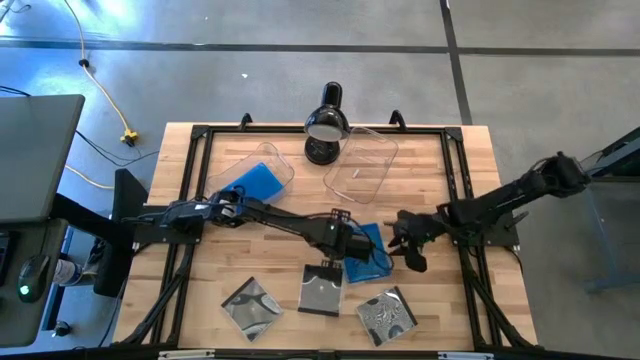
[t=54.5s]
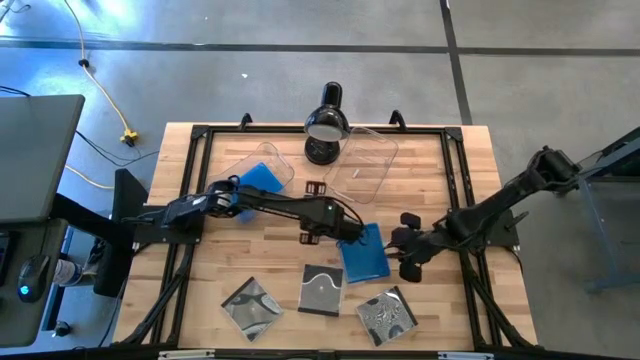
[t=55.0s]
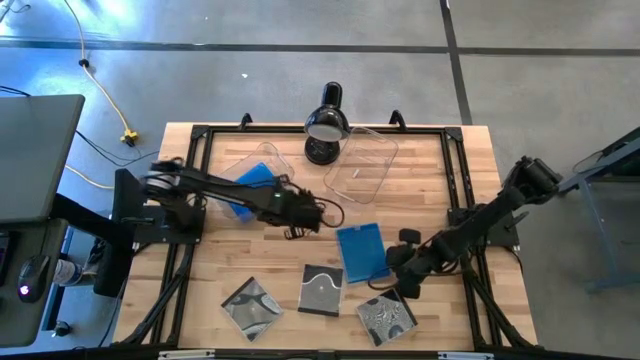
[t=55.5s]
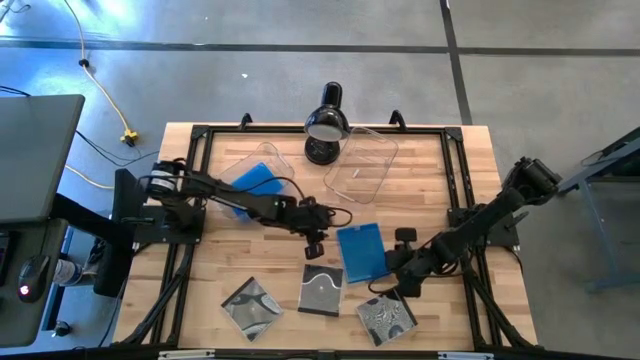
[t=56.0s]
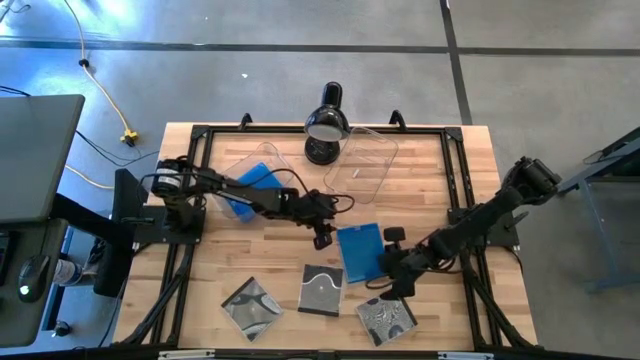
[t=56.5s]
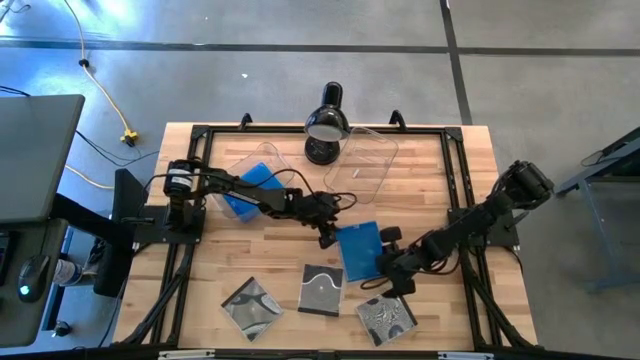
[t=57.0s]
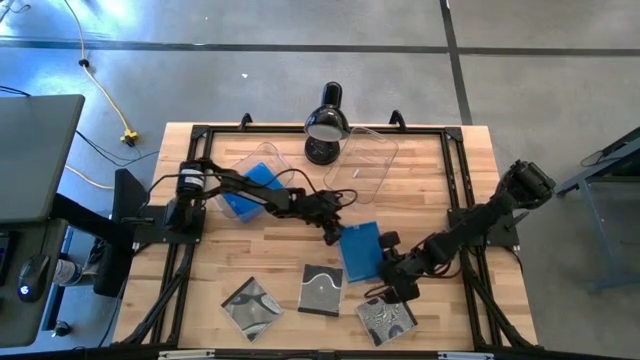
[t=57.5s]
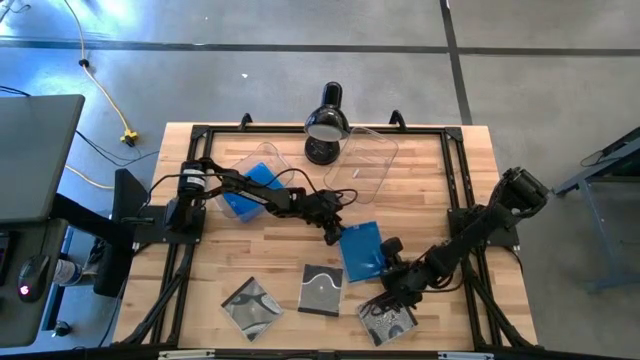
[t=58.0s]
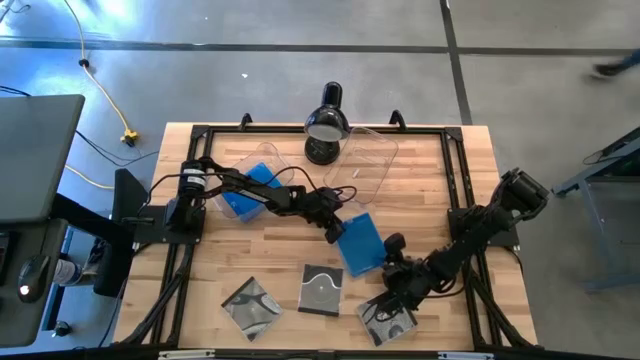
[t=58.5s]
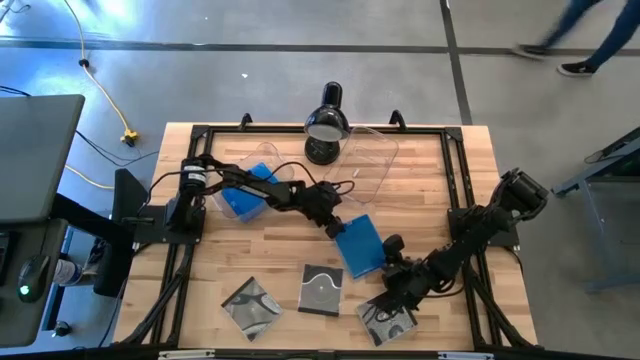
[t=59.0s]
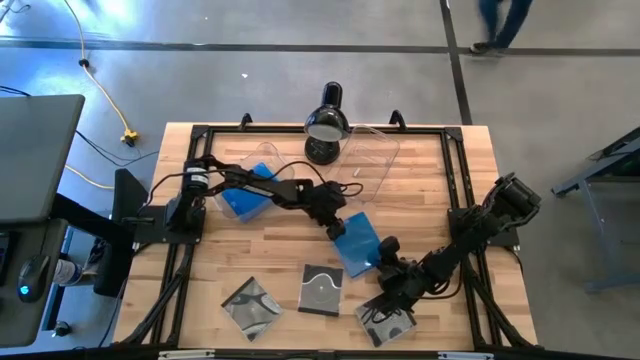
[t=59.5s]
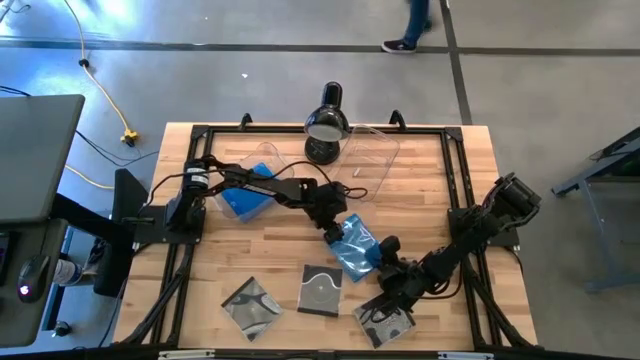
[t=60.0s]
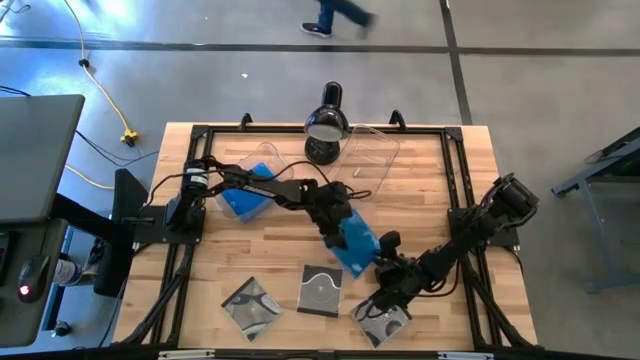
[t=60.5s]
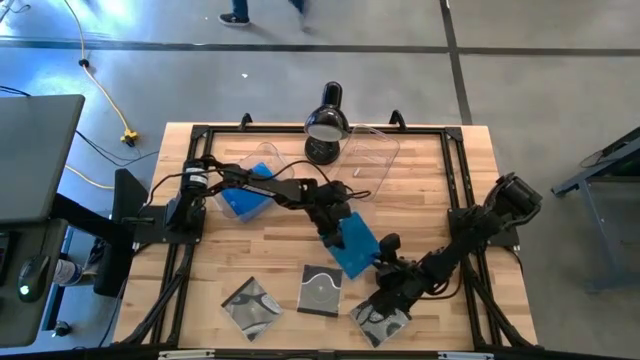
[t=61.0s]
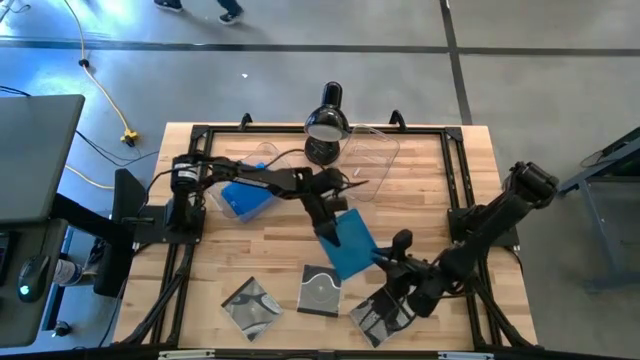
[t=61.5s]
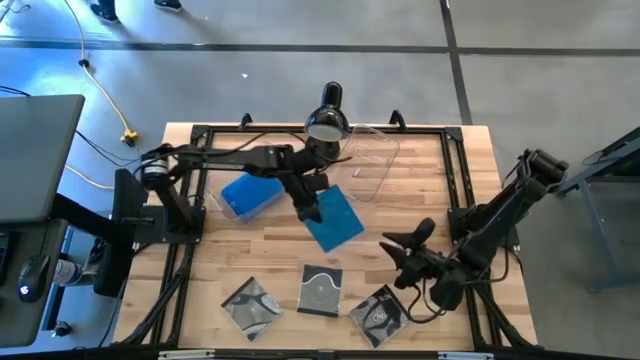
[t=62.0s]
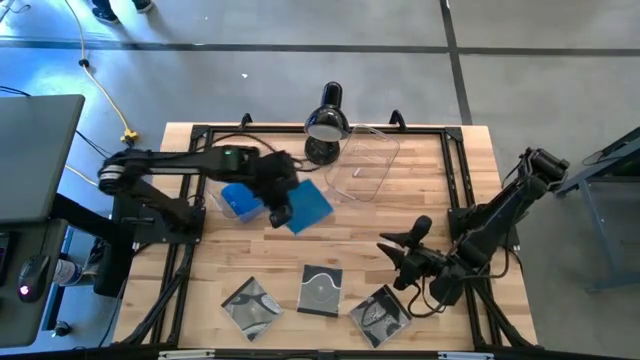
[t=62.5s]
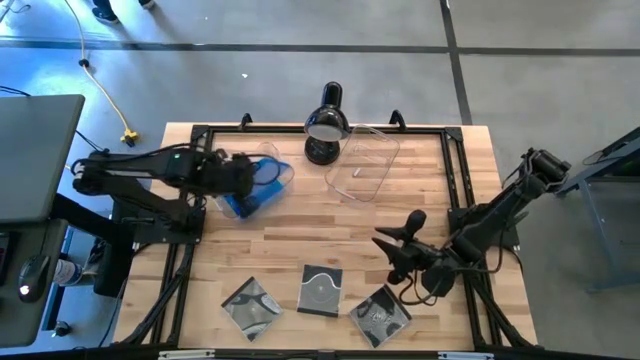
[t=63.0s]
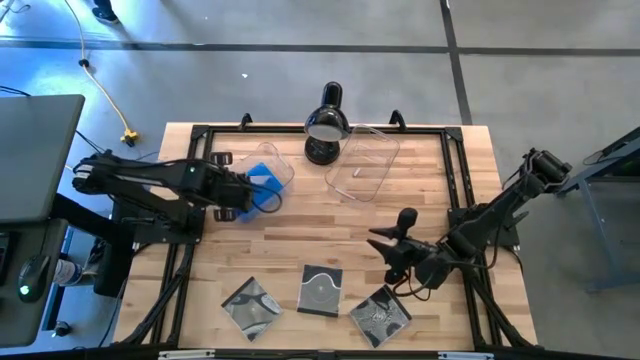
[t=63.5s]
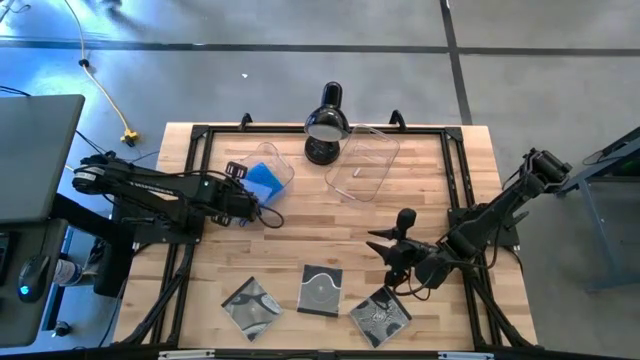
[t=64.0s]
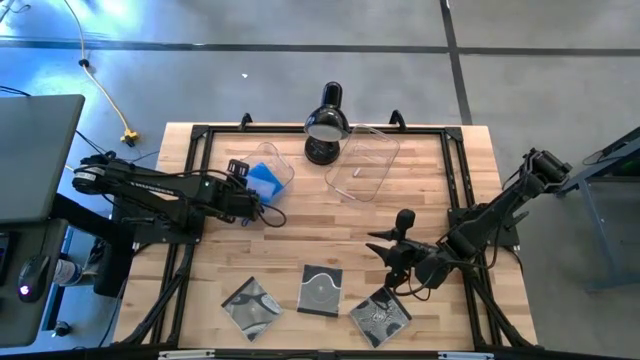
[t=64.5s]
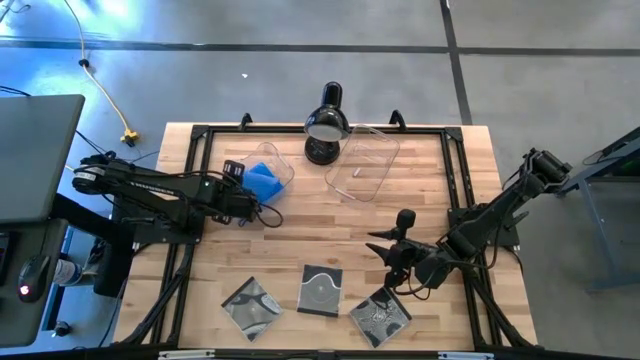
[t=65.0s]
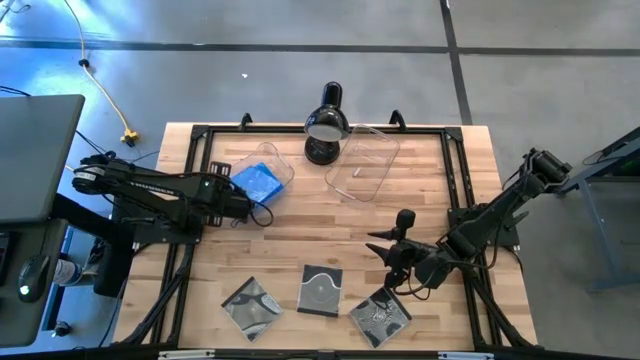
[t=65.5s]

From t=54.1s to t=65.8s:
Task: Pick & place jewel cases by type
Put the left blue CD case into the left transparent bin

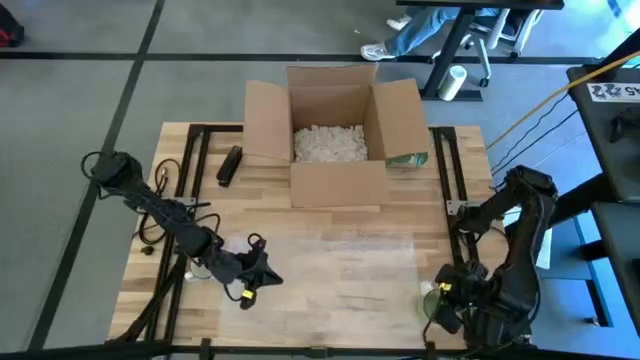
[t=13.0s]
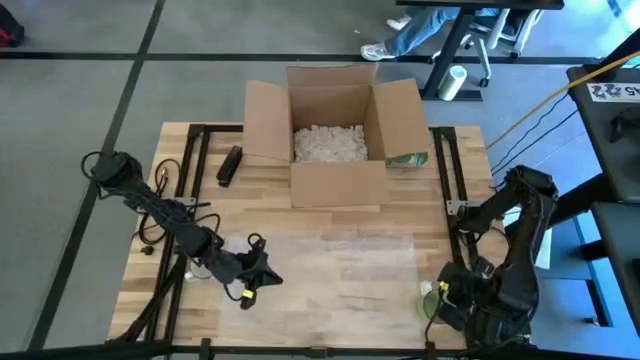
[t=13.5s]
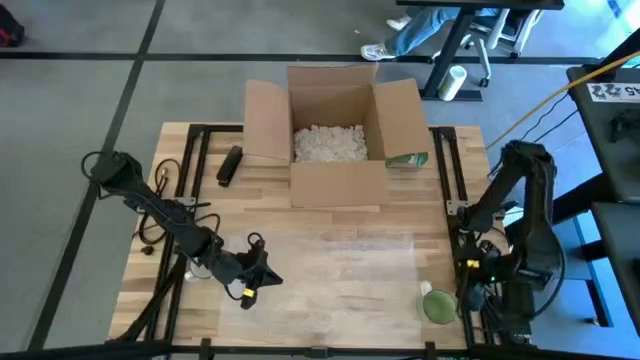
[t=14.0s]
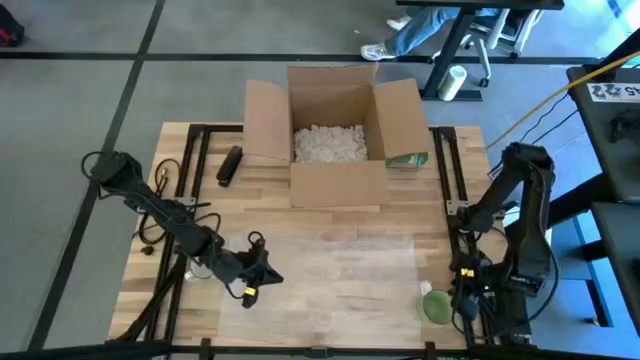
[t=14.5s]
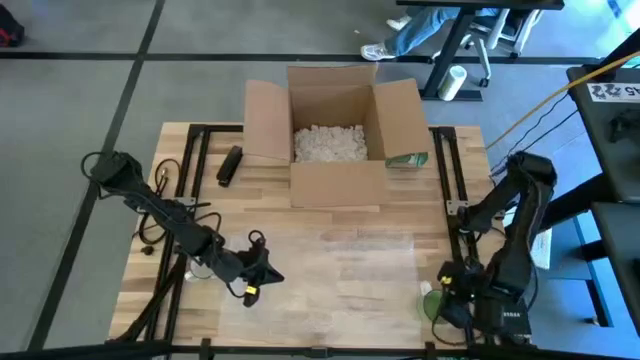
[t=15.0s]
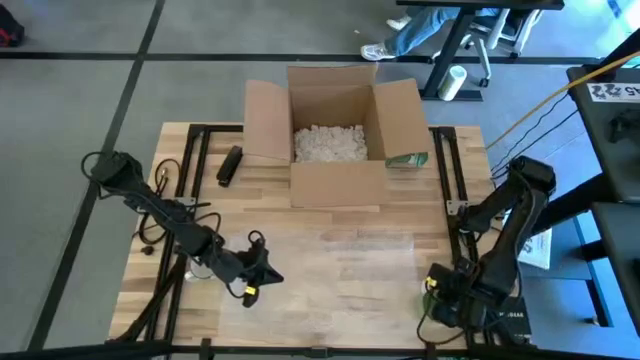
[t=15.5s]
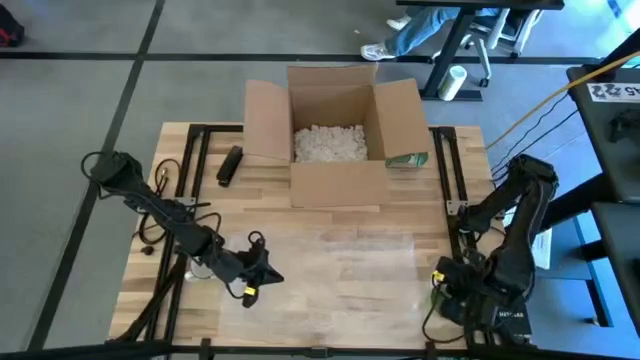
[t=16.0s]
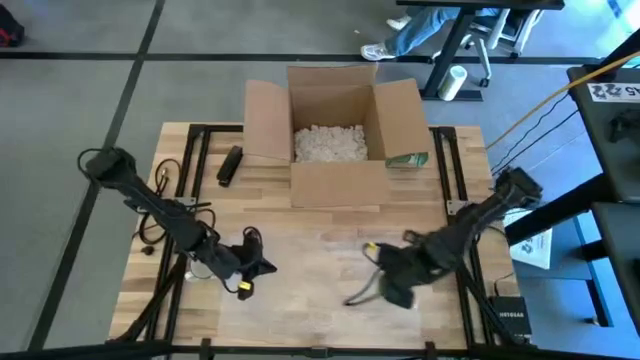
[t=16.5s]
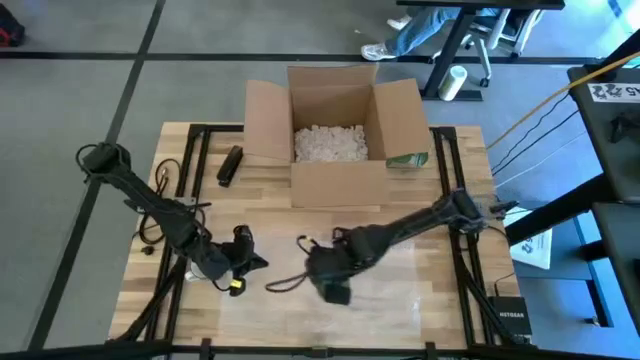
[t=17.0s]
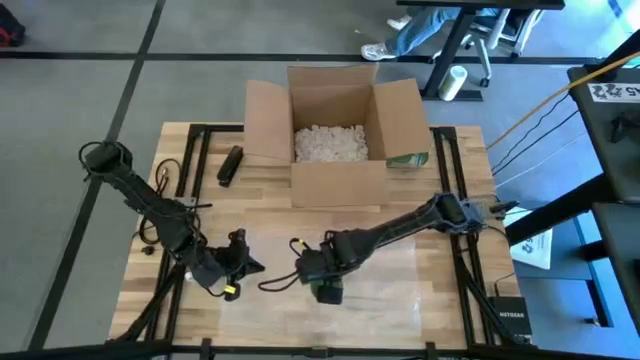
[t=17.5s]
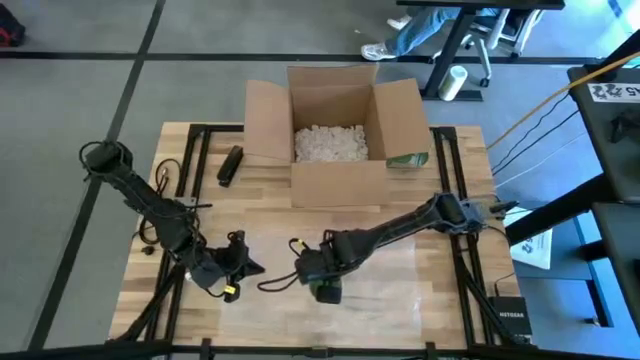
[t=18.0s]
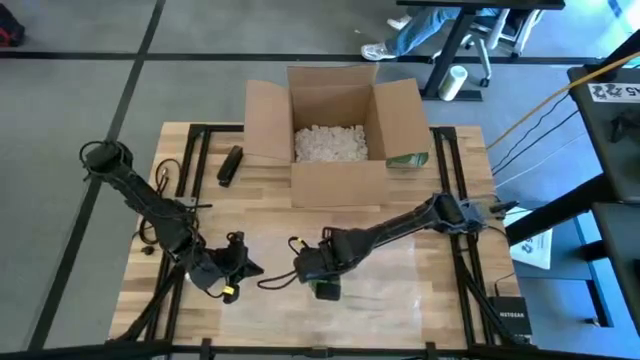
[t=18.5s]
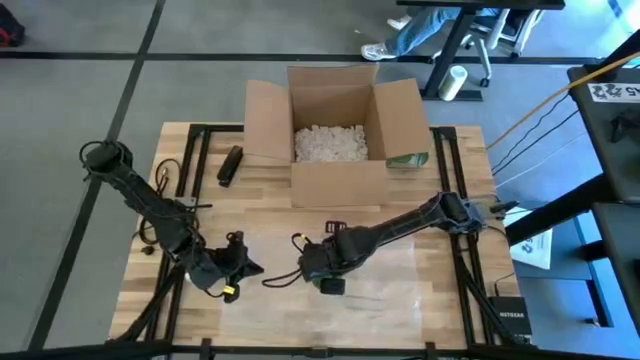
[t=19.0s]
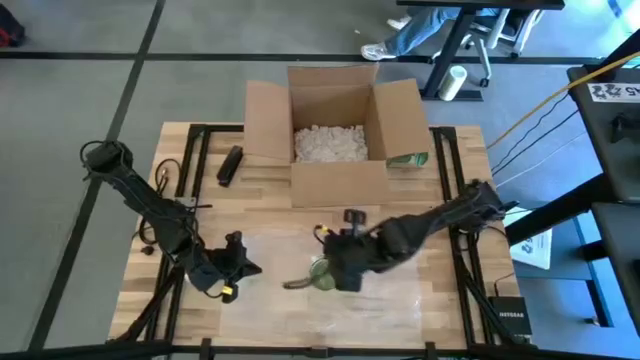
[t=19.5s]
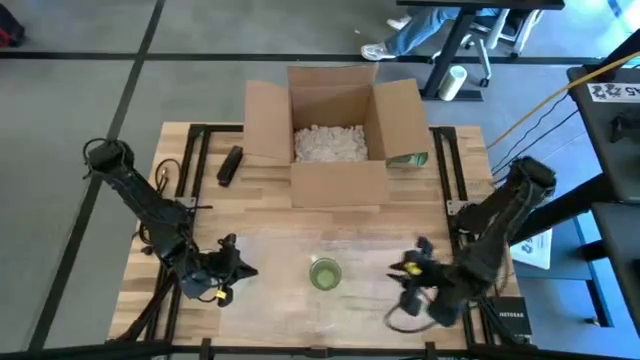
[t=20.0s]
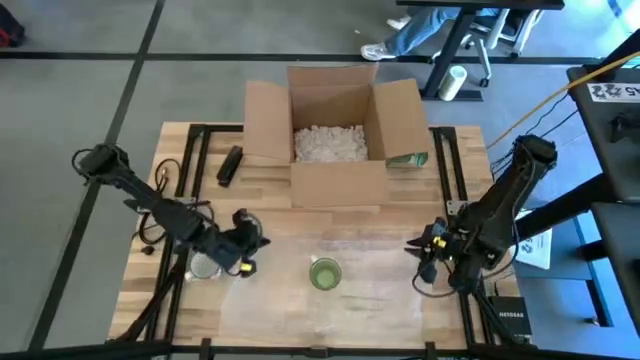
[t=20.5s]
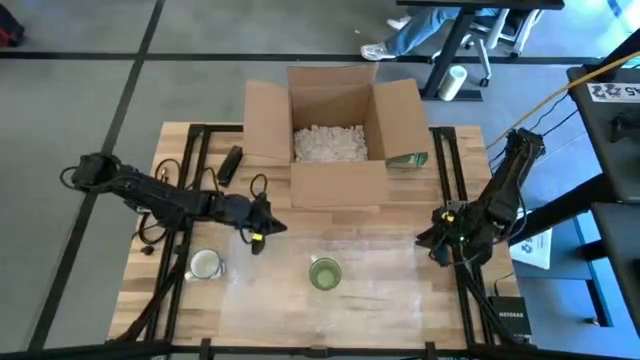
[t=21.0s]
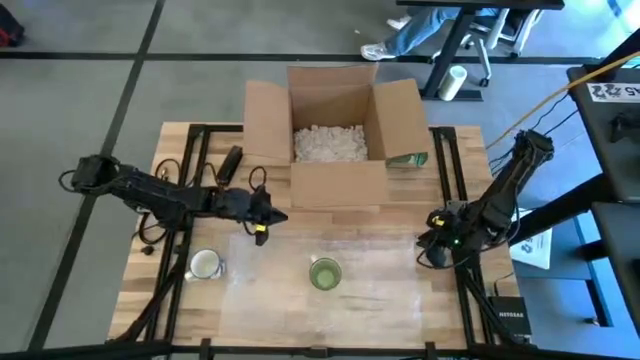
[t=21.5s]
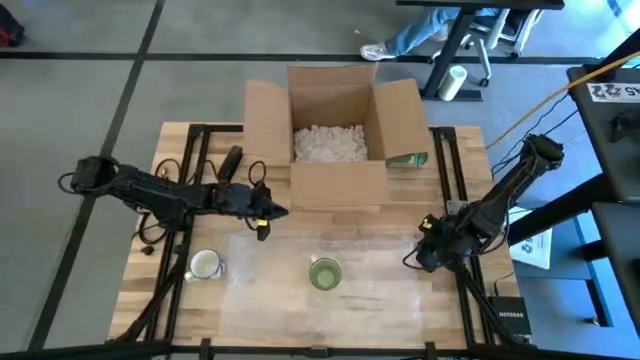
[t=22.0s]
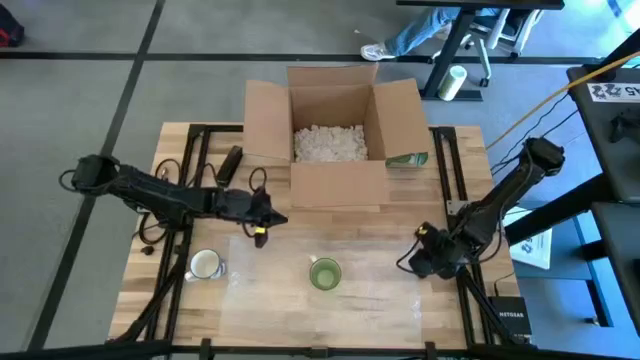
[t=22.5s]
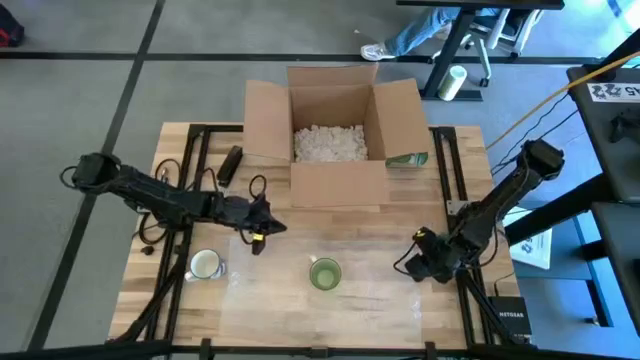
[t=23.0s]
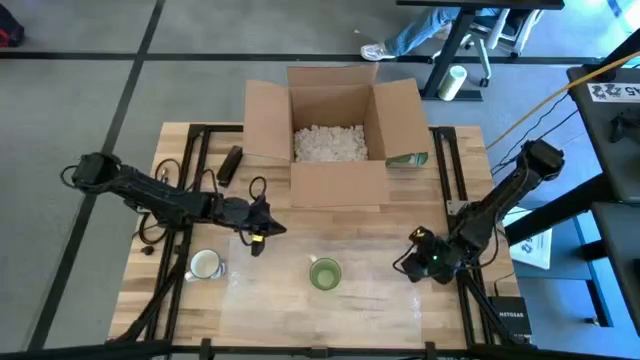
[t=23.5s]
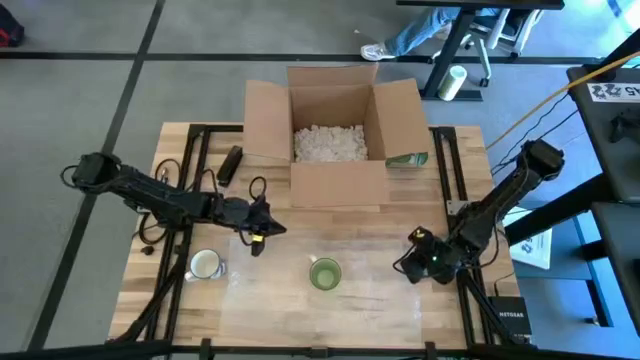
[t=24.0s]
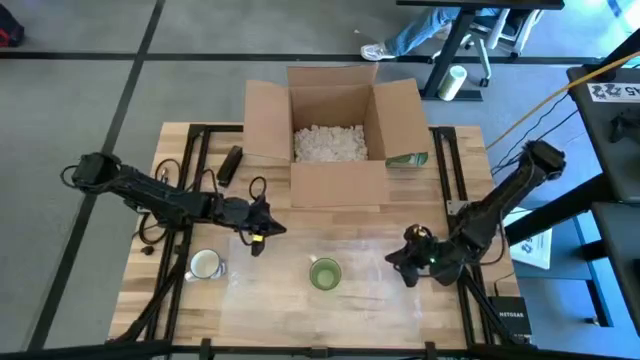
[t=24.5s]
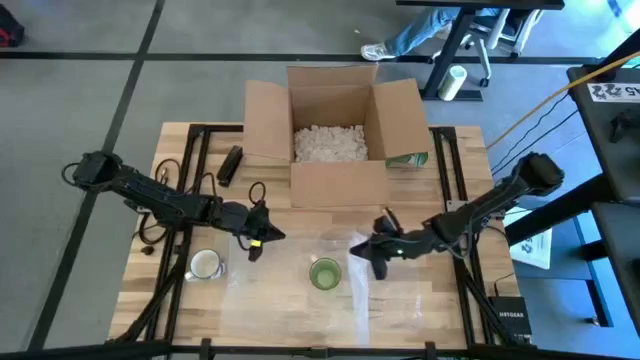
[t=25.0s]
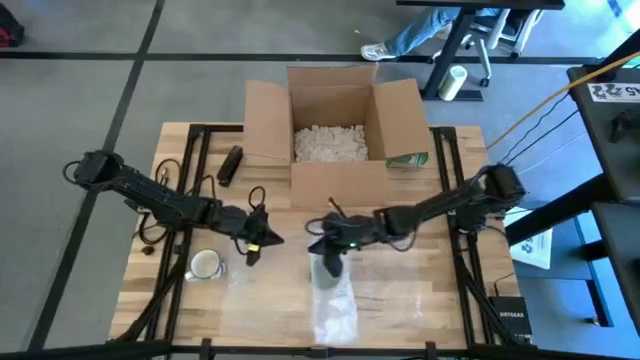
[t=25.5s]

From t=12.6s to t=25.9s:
Task: wrap mug
Wrap the green mug with bubble wrap
